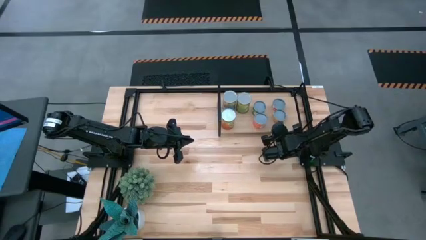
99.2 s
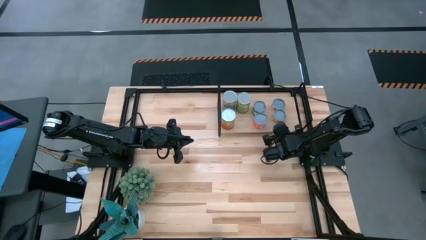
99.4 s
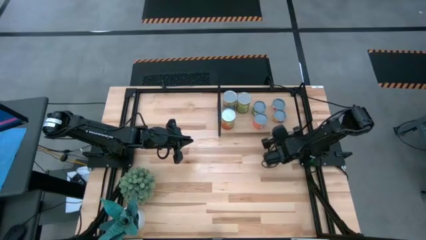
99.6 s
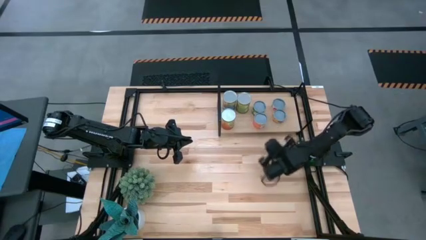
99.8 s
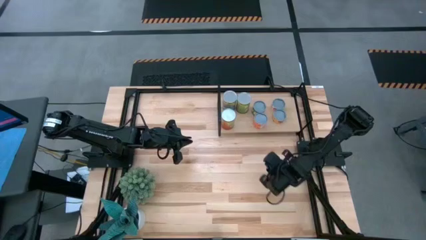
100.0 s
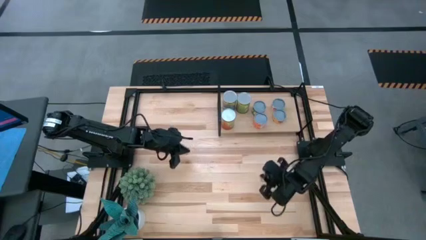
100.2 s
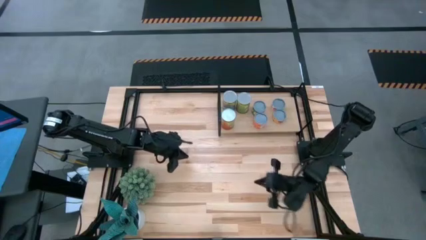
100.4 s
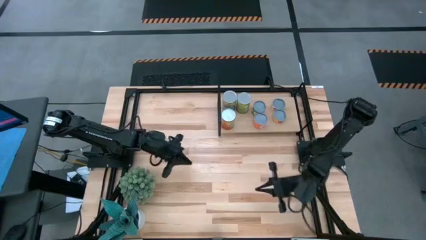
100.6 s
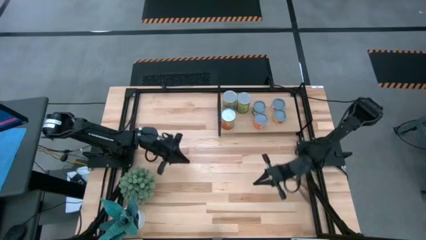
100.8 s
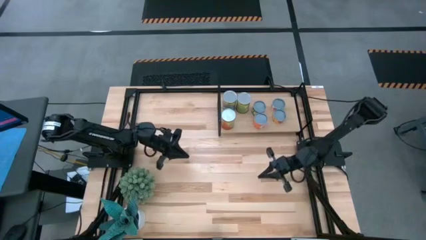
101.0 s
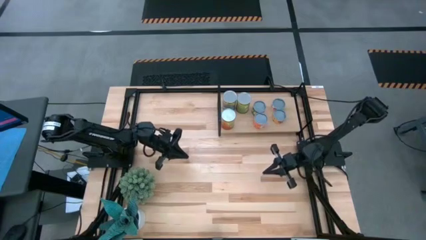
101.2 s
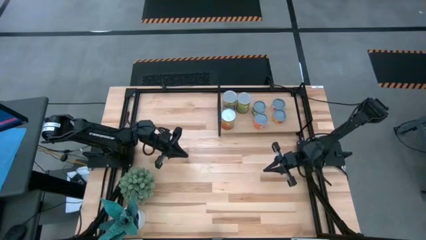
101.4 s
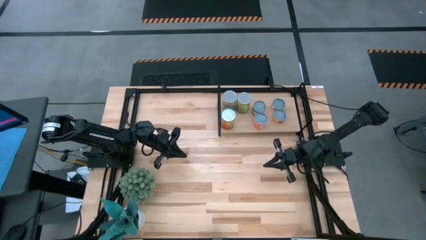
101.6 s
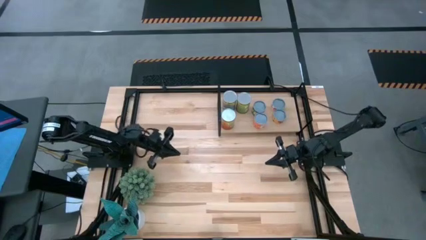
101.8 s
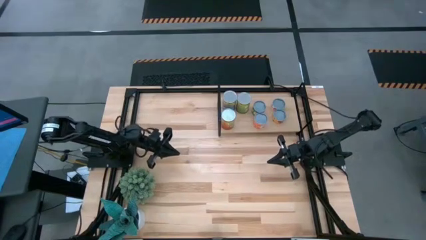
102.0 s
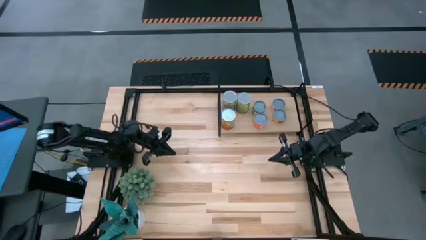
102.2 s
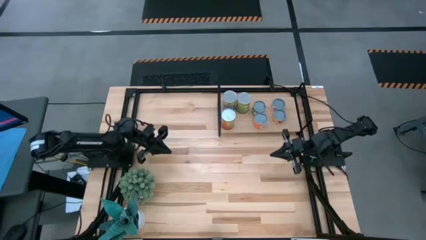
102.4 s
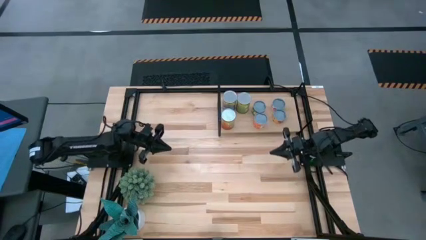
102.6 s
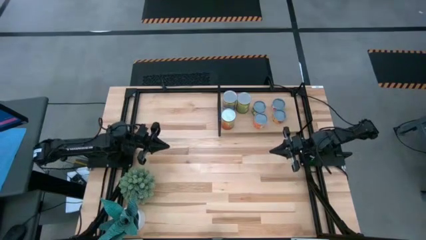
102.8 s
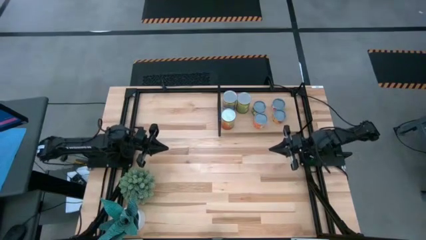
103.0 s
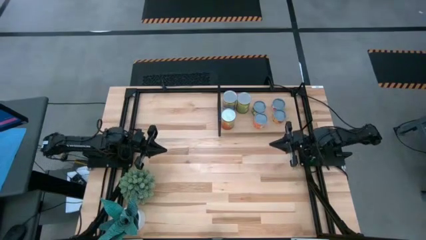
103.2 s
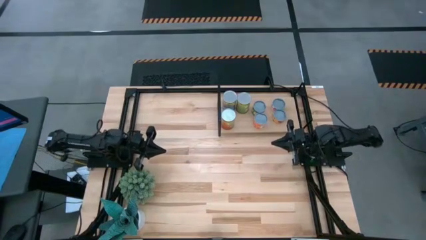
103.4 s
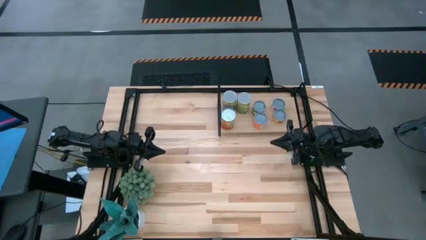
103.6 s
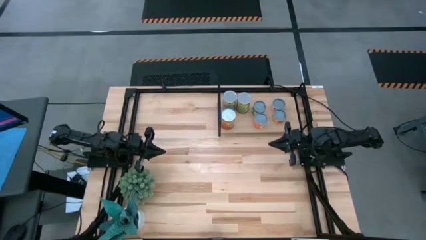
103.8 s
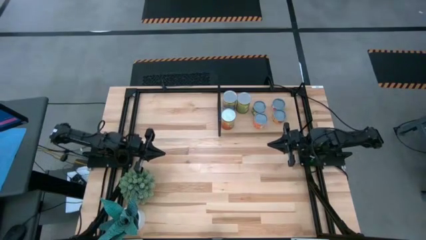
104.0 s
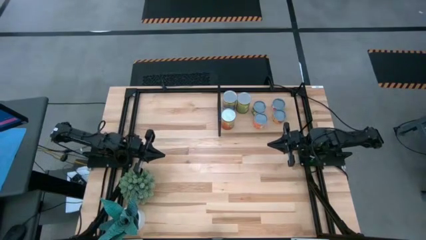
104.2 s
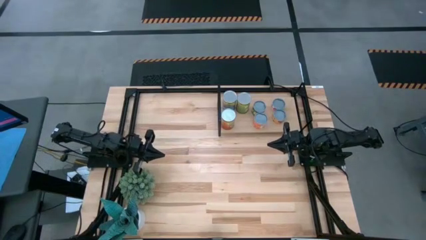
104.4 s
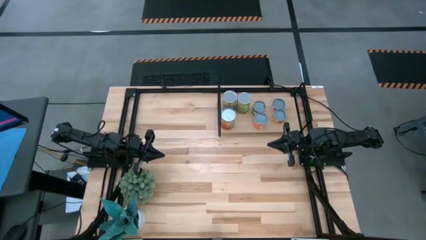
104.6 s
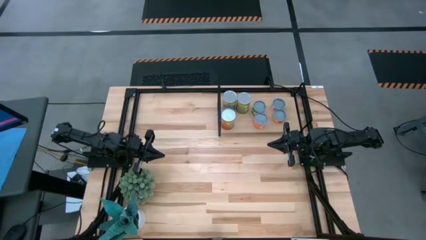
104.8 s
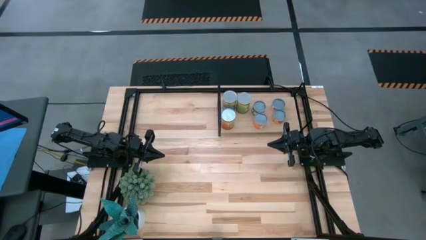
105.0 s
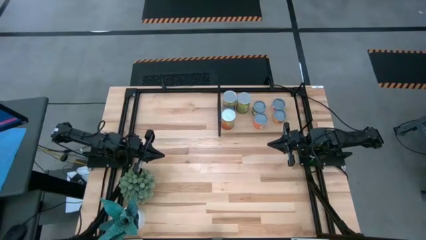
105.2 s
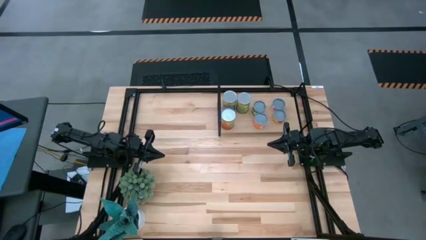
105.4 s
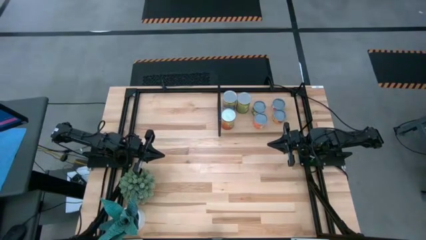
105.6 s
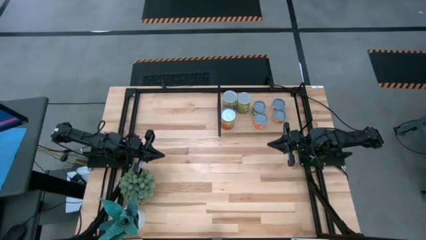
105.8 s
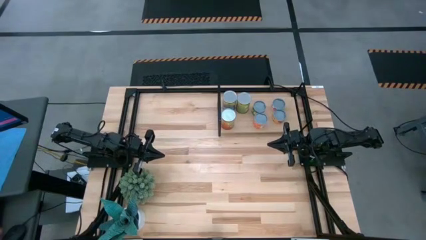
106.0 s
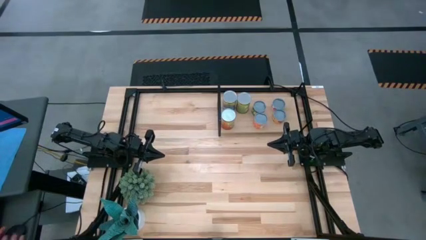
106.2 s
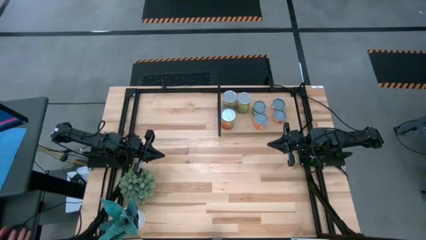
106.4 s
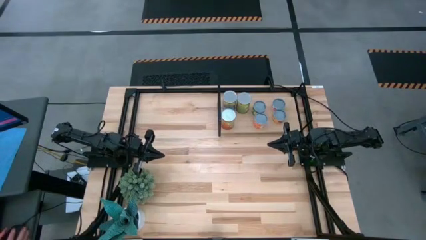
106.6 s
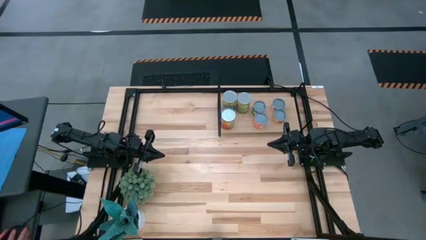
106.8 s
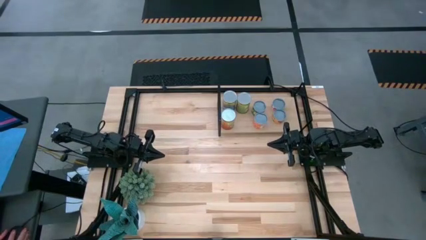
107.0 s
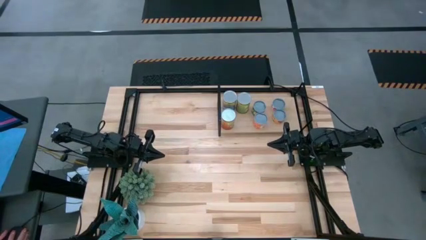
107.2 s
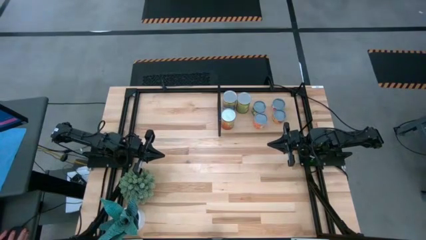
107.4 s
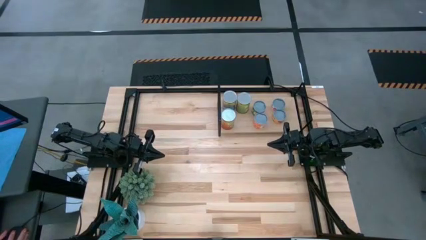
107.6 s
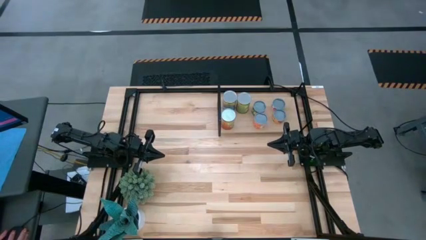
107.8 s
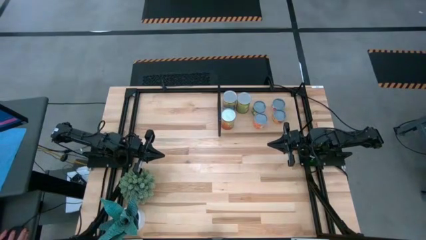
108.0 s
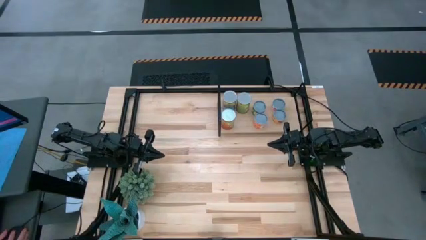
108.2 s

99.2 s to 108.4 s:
Task: Pick and place cans onto a shelf
Return to Home Position

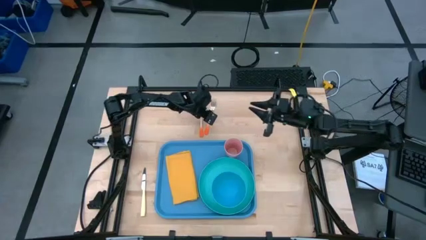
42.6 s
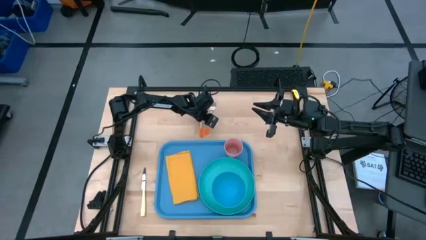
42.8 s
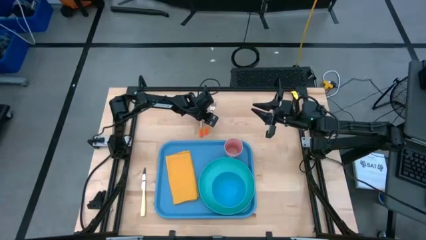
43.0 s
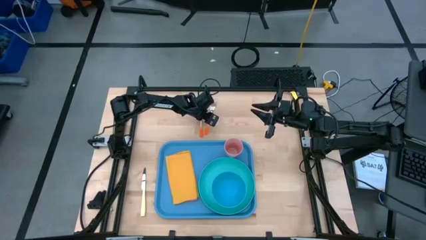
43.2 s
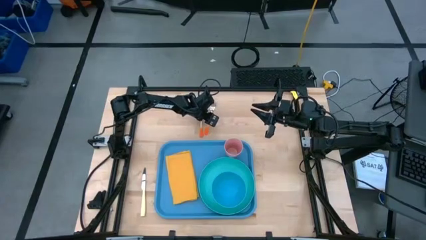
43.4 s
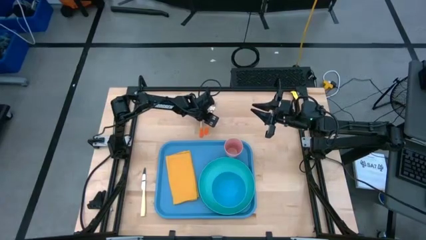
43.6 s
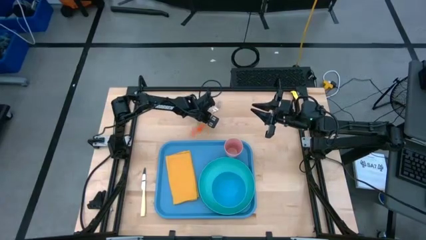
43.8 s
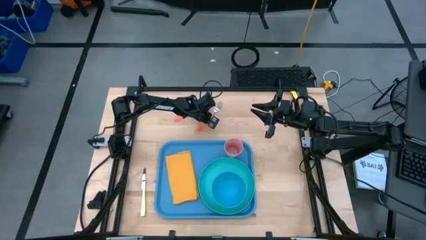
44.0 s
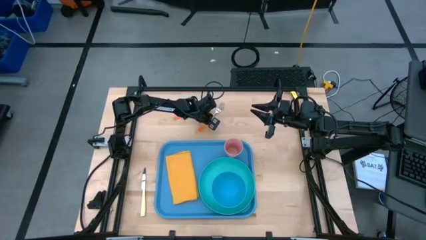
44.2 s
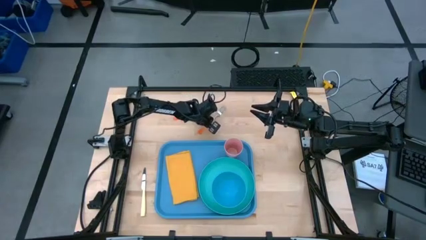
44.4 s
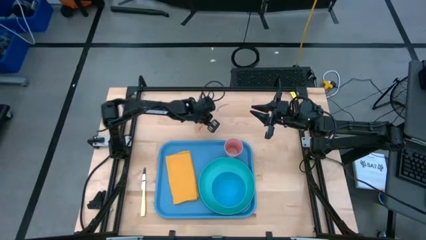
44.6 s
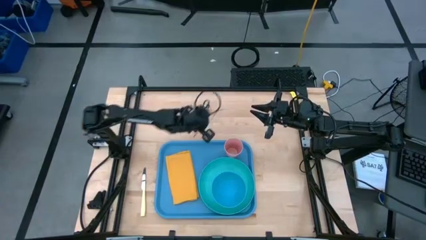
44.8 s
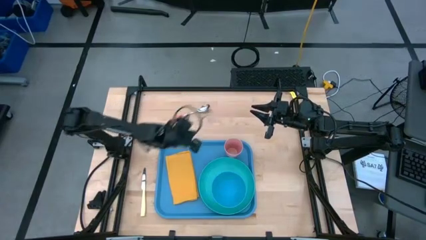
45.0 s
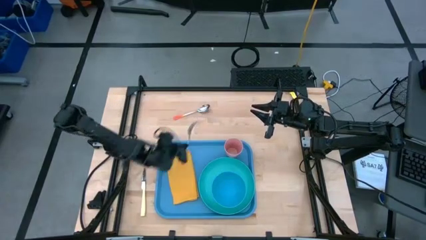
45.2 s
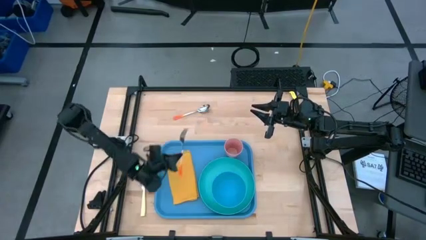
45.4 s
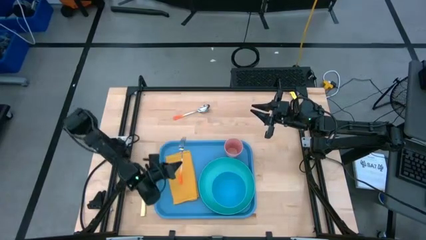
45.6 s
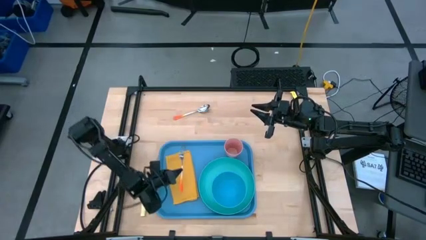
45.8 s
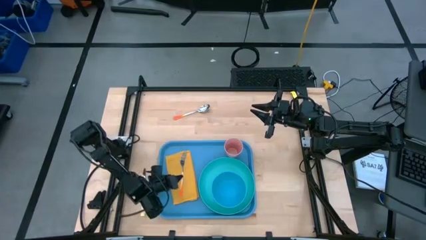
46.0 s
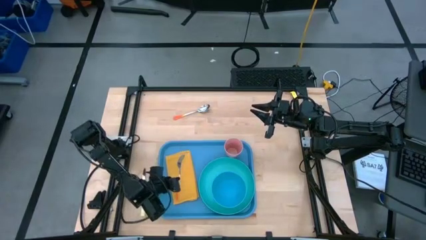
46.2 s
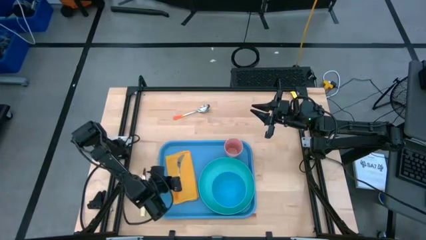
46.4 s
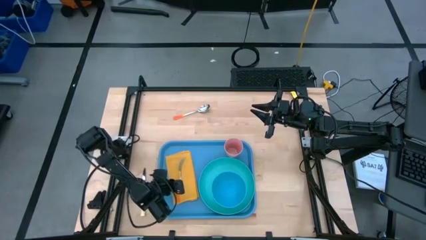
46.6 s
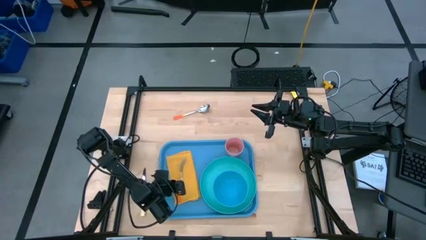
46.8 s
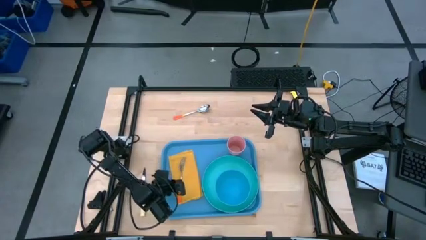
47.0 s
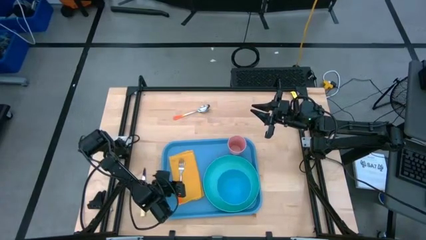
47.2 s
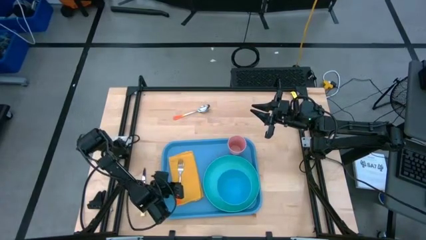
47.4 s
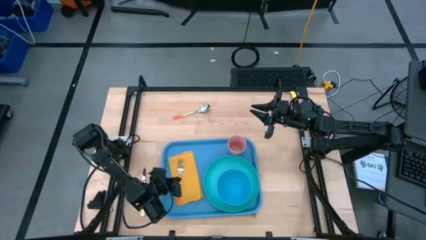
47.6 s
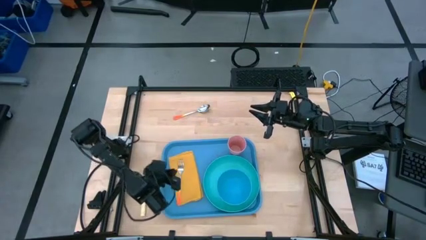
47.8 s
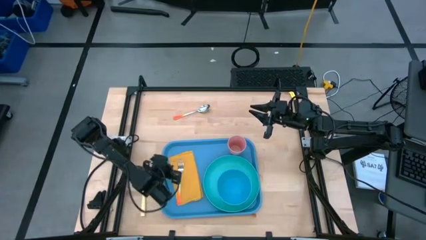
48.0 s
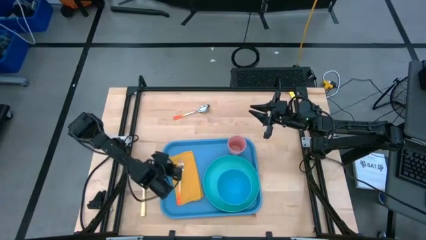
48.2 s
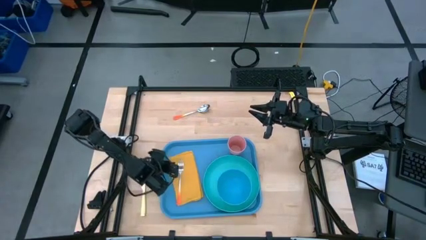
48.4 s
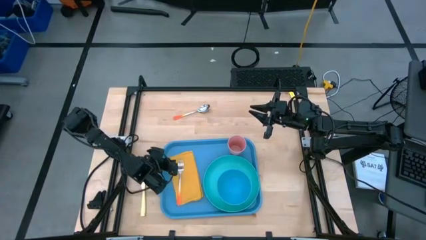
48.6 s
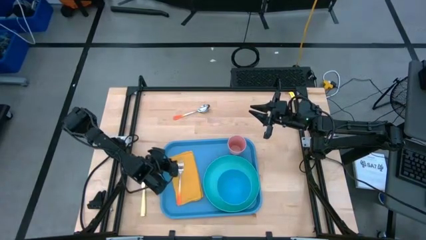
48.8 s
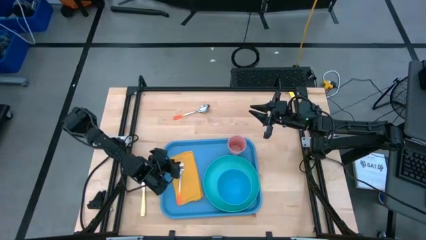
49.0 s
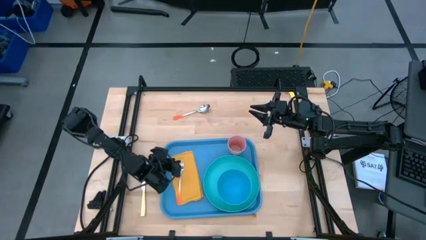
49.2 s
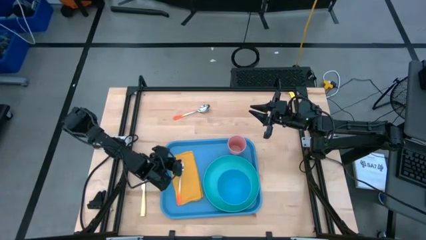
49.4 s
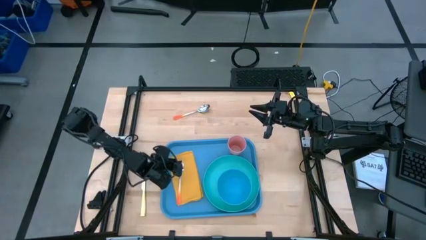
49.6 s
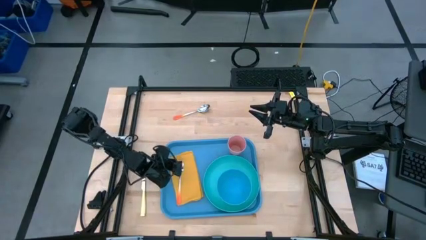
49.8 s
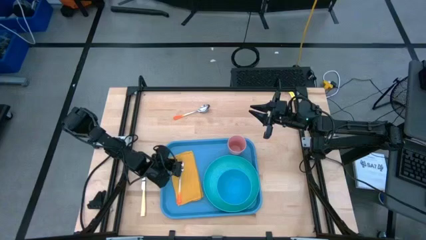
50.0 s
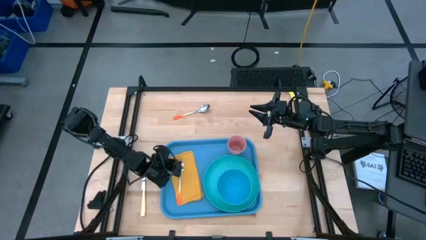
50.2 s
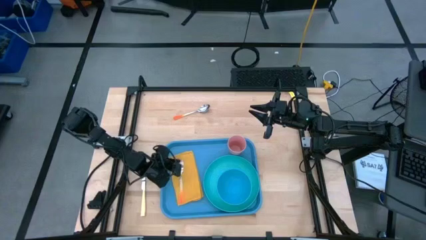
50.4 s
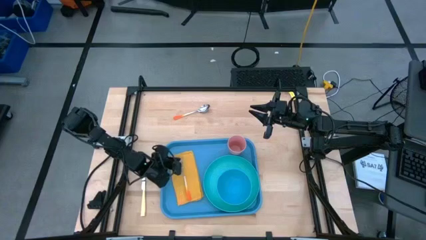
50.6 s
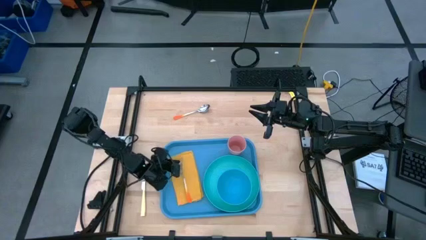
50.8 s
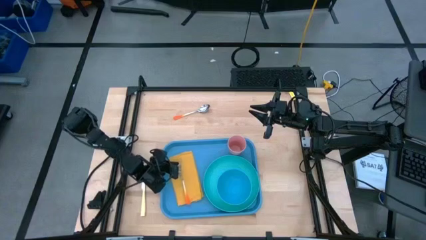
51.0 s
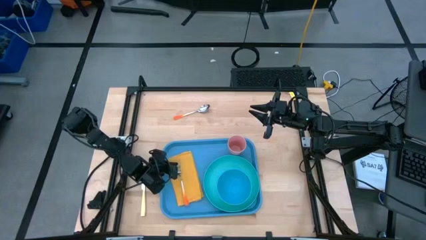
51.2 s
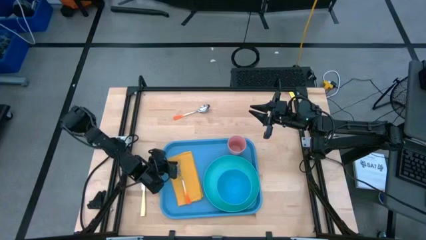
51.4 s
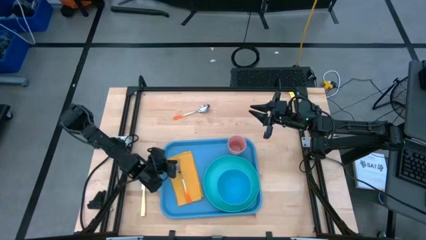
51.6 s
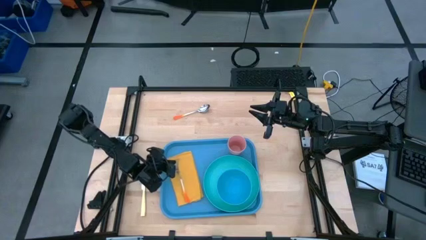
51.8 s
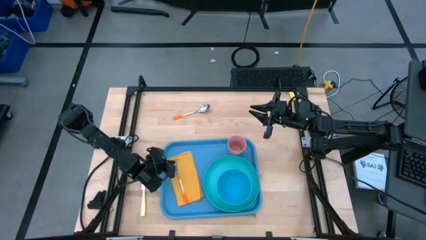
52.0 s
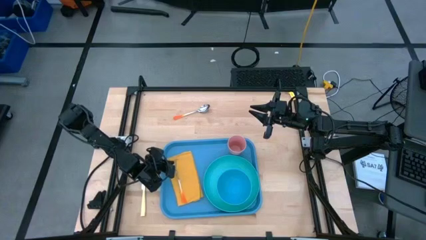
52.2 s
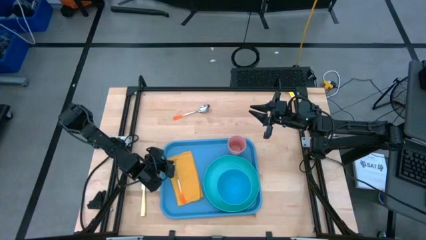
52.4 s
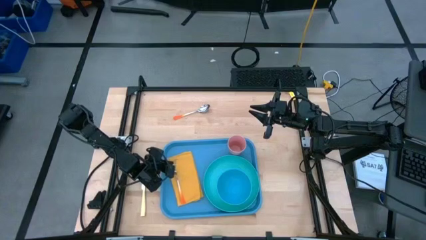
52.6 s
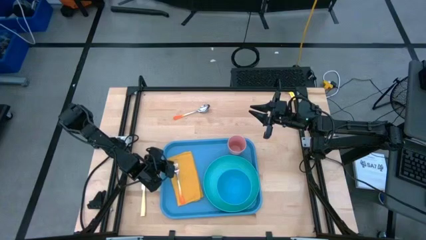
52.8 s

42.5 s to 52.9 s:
Task: Set up tray
Put the orange fork on the yellow napkin
